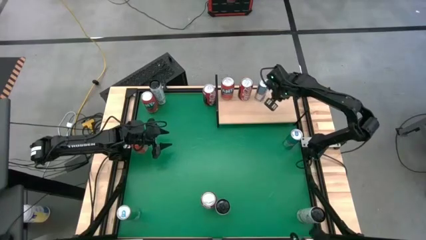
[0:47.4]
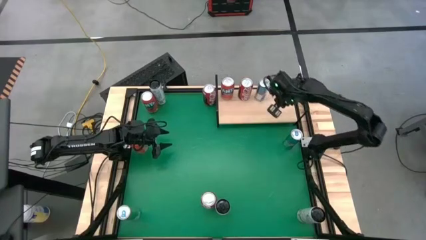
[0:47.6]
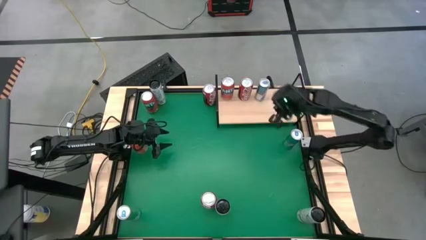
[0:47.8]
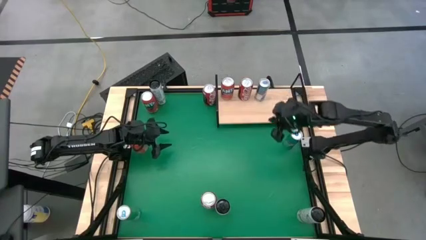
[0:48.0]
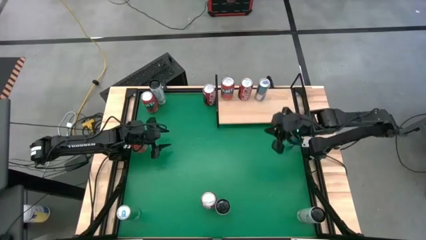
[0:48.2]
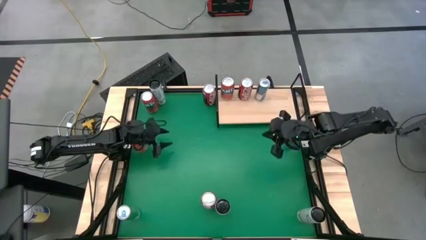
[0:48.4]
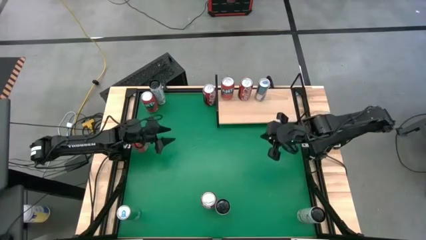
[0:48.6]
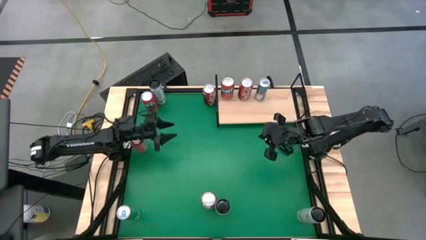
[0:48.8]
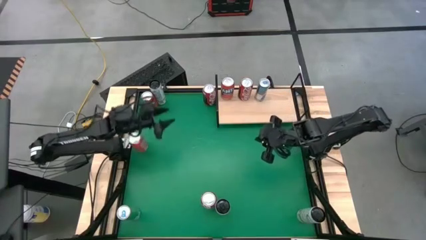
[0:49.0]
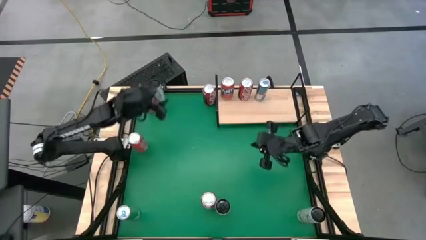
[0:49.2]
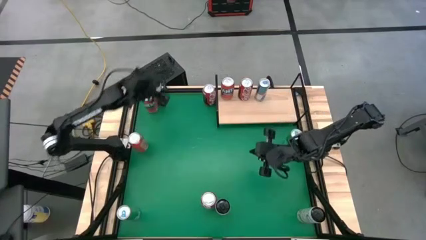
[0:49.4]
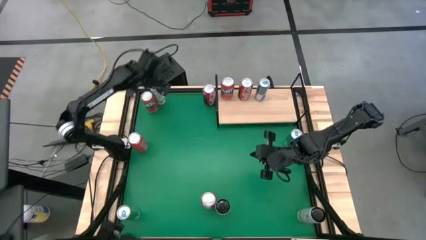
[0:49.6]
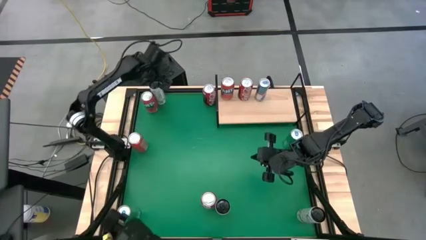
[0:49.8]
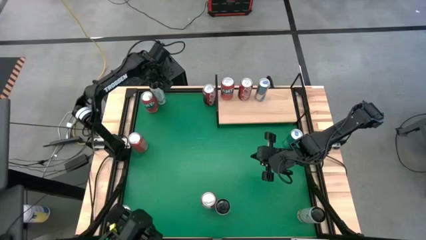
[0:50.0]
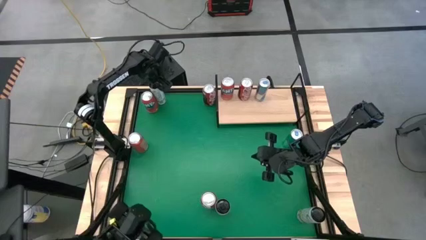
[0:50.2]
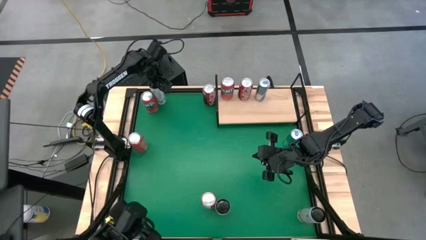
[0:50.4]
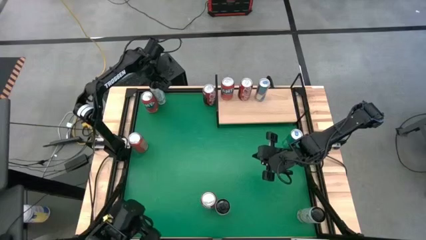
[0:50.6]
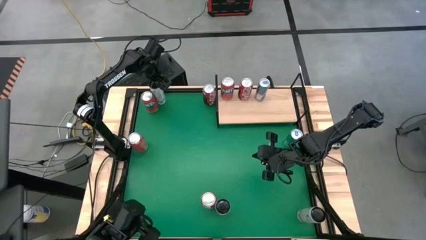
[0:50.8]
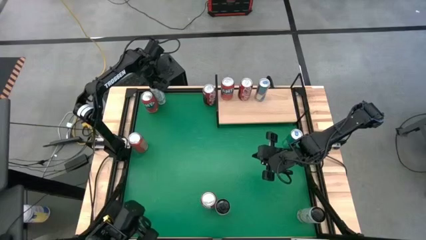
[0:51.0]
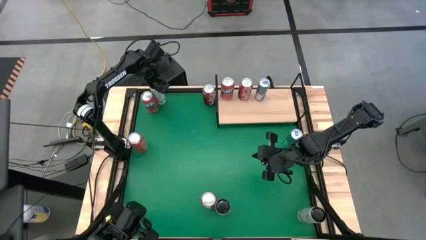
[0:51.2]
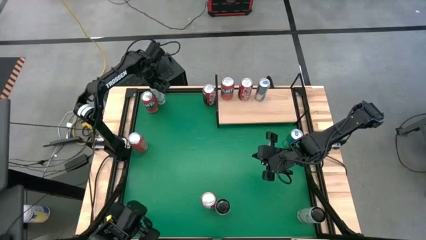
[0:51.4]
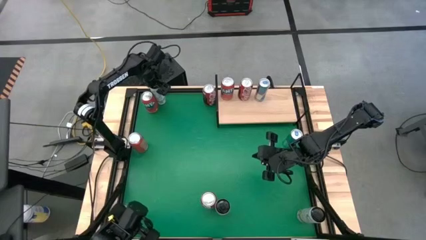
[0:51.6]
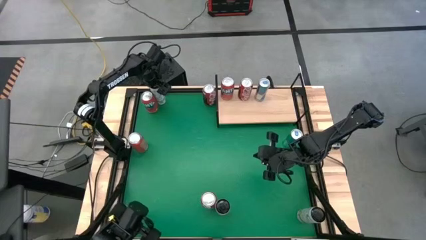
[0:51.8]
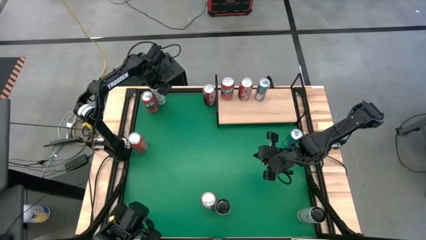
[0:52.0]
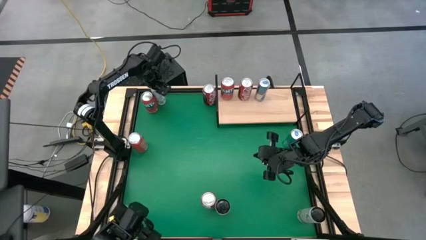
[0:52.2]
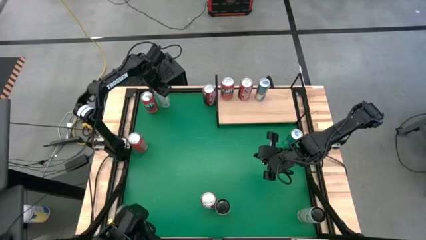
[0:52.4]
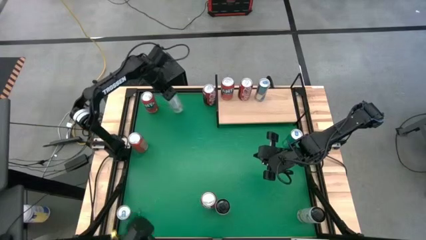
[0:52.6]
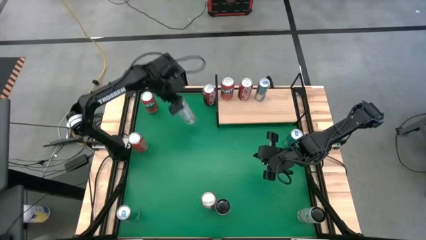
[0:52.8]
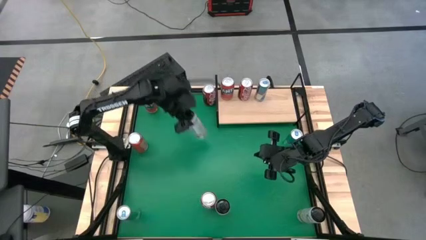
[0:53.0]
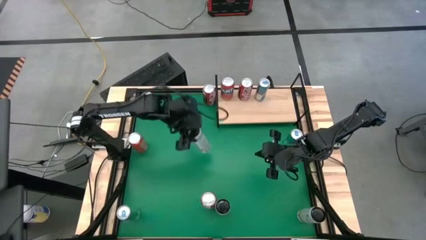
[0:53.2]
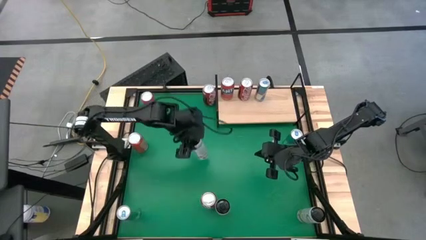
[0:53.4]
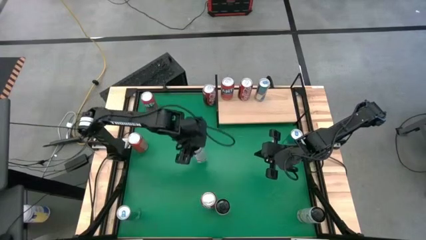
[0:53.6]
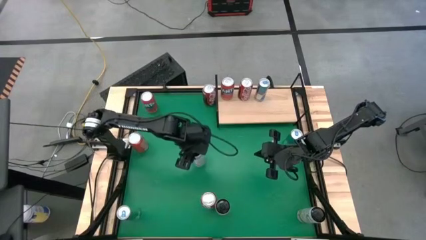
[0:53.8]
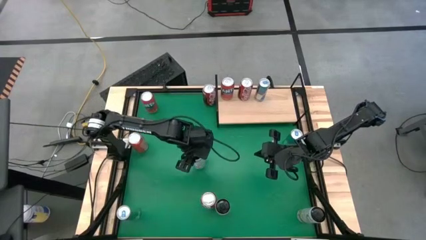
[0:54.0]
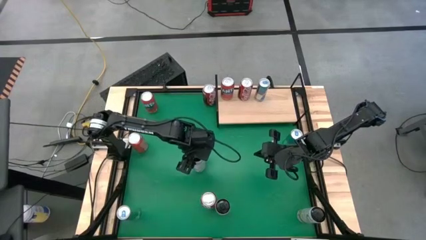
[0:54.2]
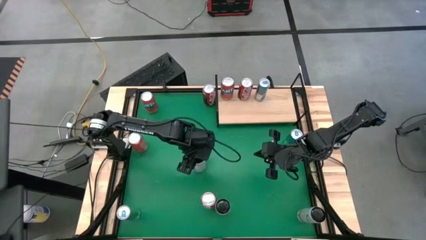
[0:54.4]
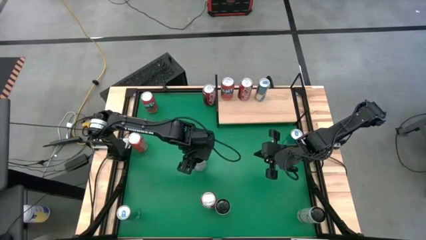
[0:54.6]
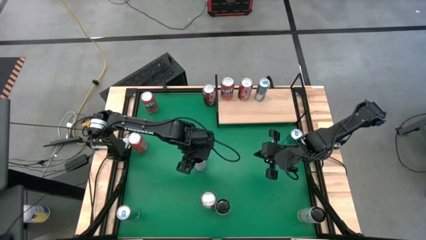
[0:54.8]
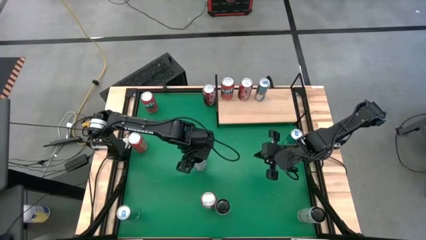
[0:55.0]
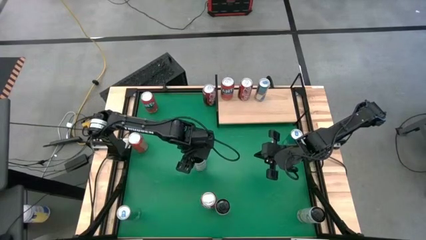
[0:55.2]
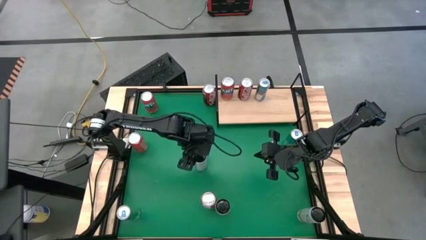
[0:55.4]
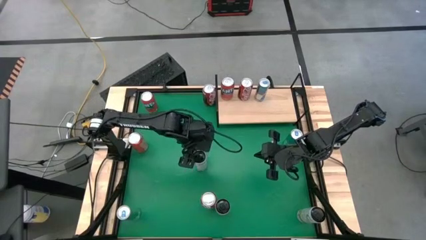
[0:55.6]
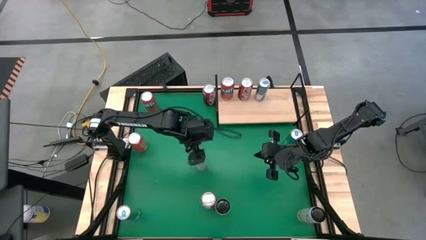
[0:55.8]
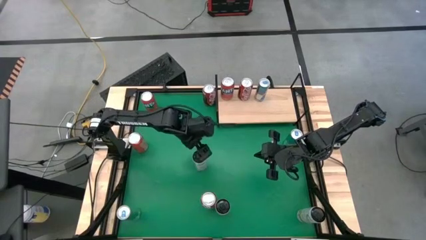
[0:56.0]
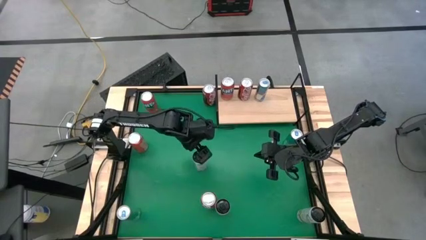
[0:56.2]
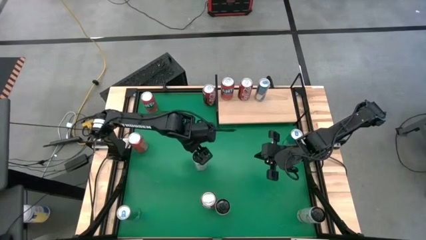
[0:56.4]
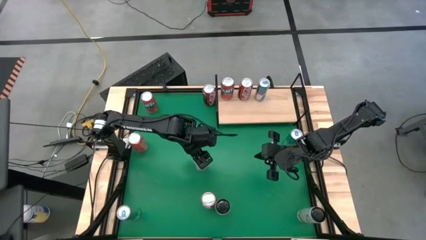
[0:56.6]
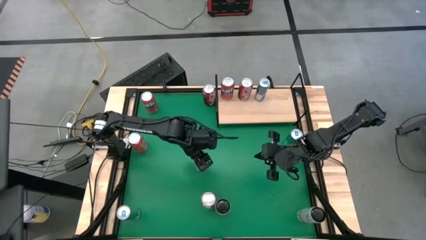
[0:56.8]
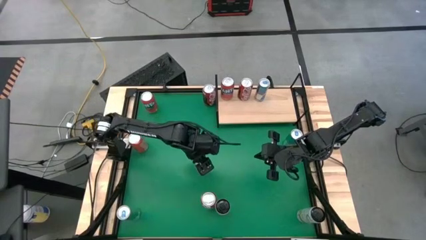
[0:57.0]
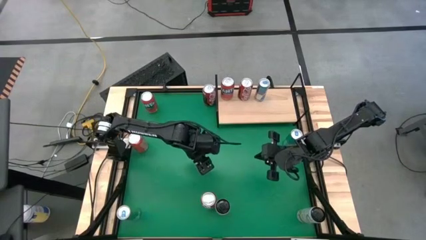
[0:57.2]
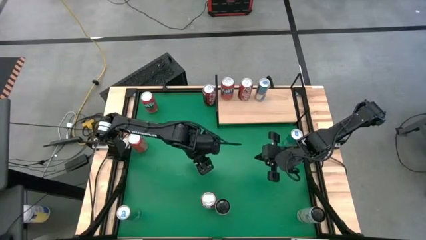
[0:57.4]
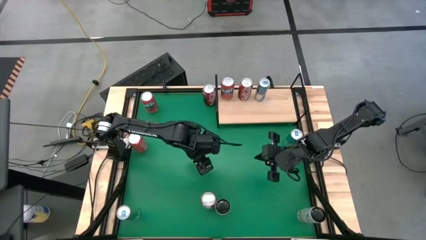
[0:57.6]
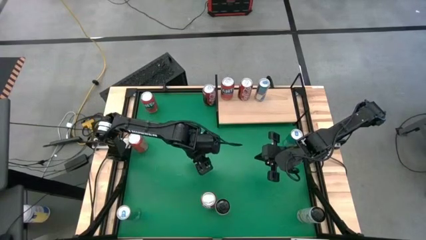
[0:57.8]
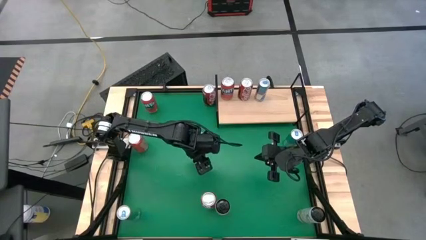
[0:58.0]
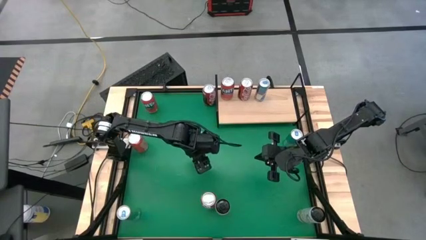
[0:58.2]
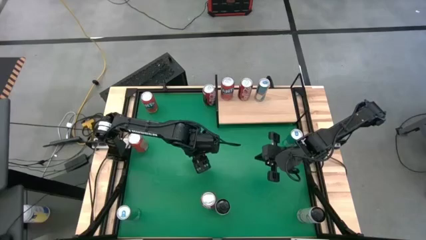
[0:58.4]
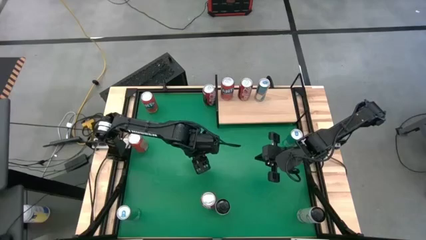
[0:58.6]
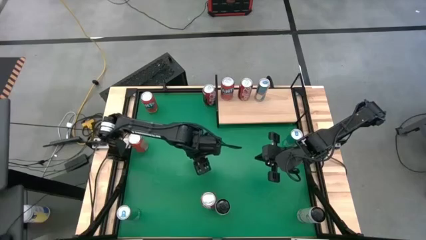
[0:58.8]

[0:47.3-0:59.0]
Task: Place canned beverage on shelf
Move the top left yellow soda can to the center of the table
